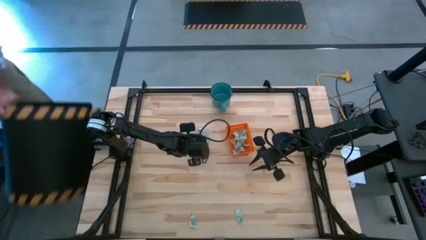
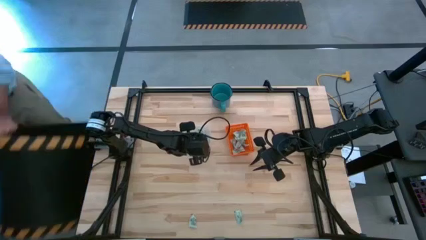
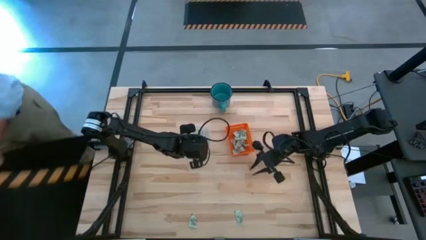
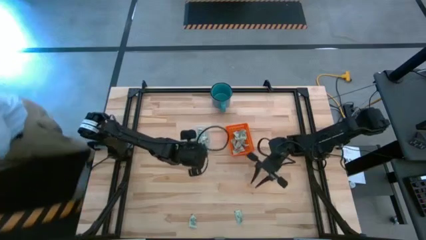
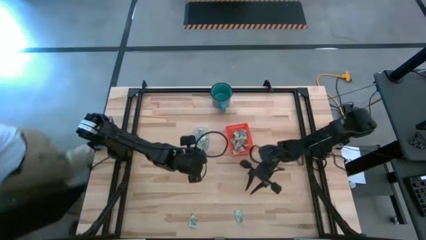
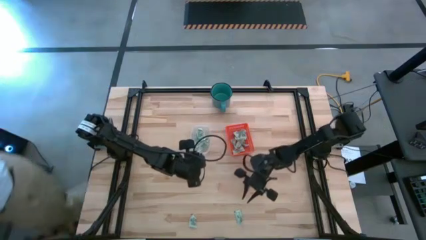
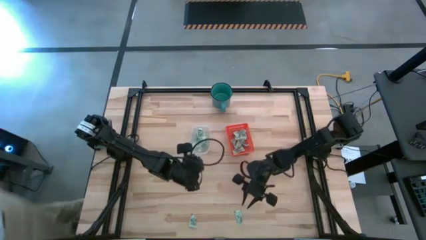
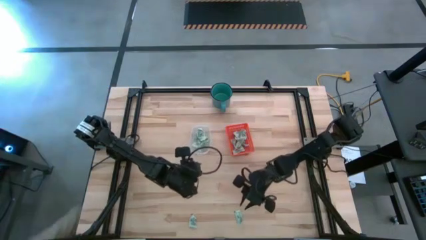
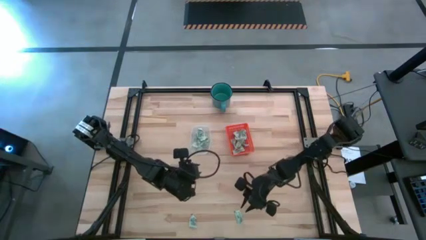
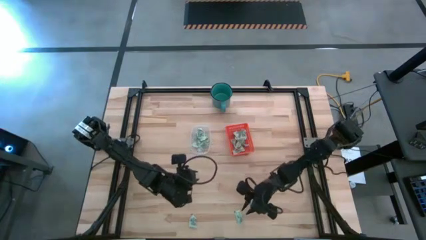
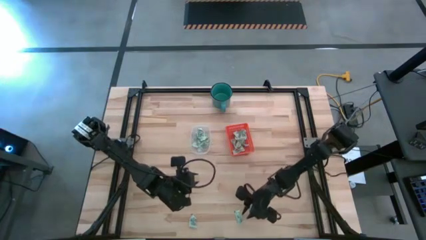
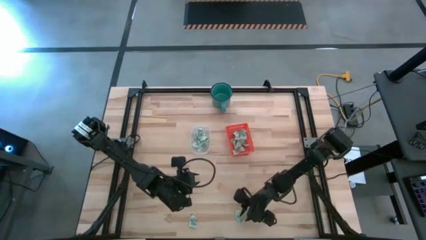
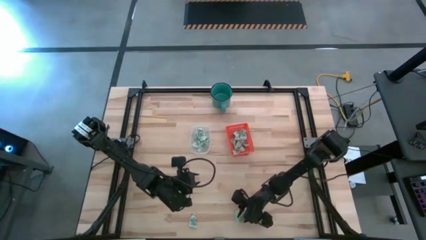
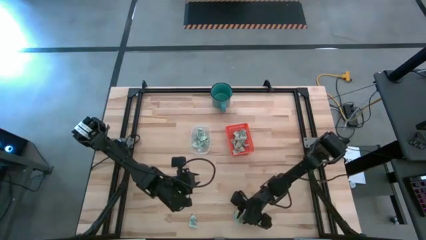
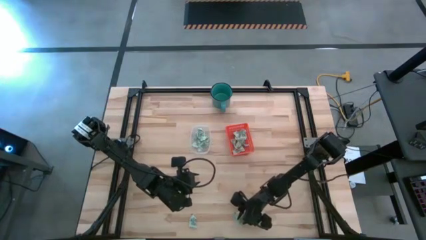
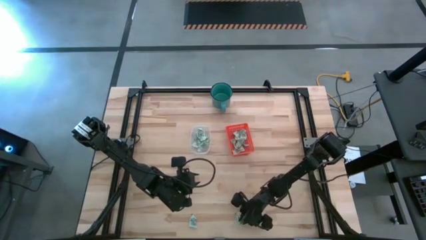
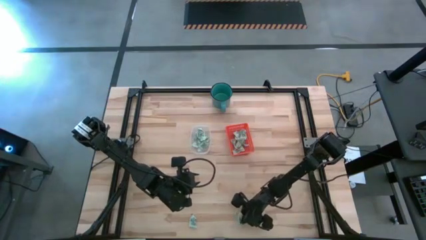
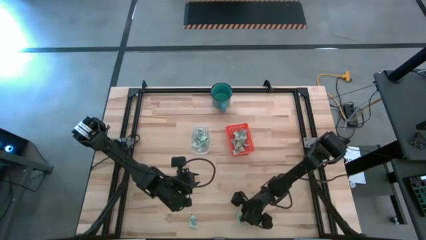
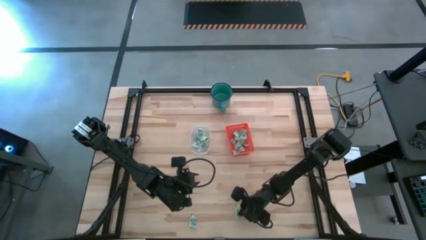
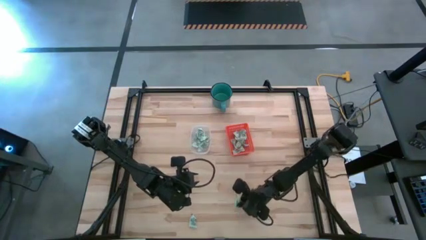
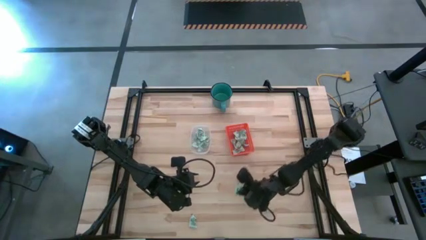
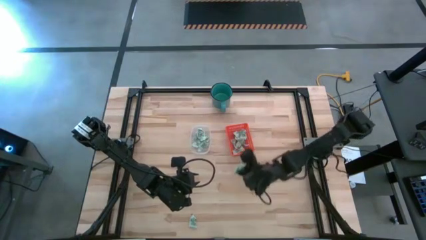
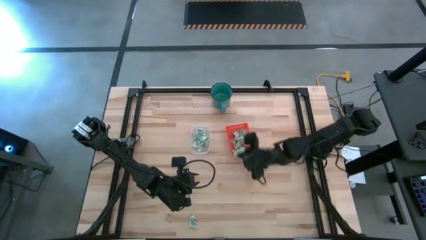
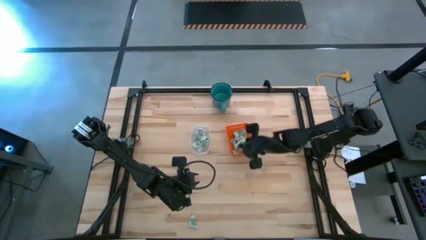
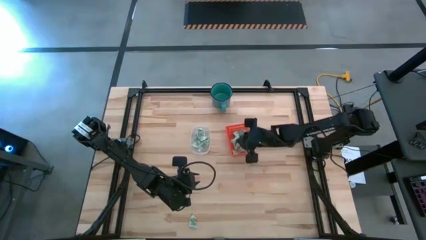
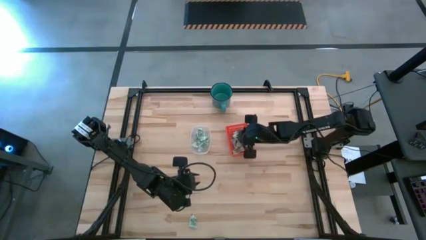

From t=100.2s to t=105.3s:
Task: Pick and place items into bin
Put the right stevia packet into the orange bin

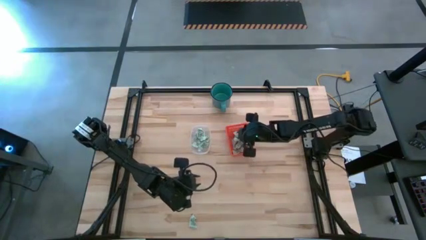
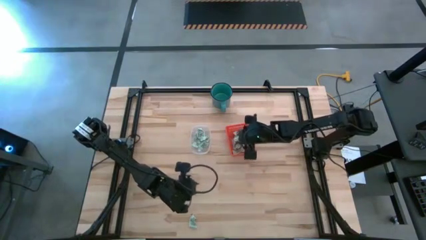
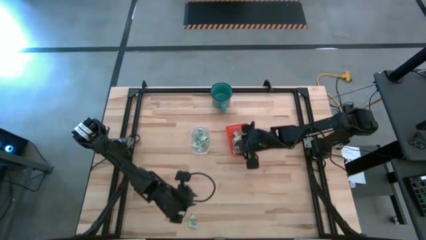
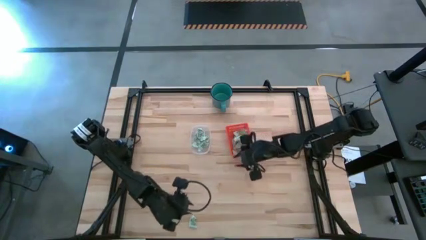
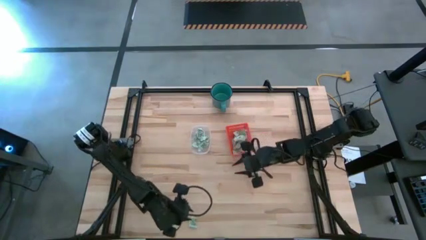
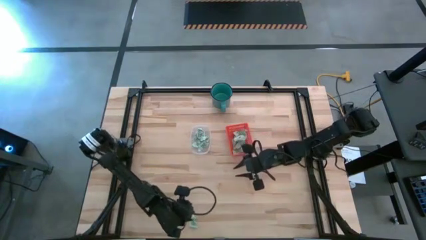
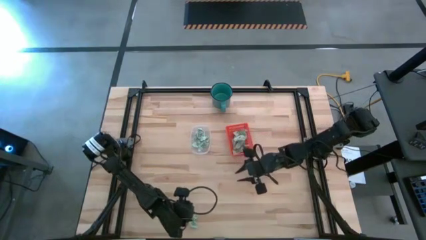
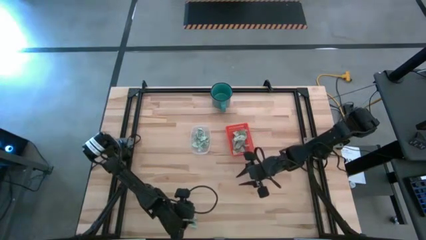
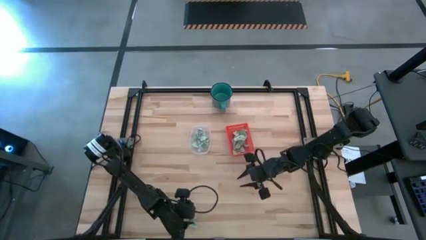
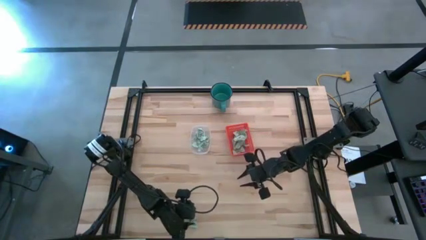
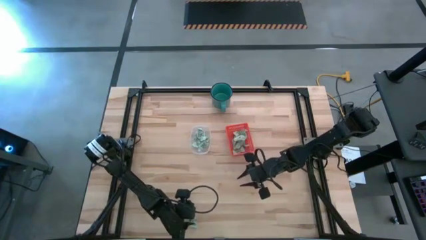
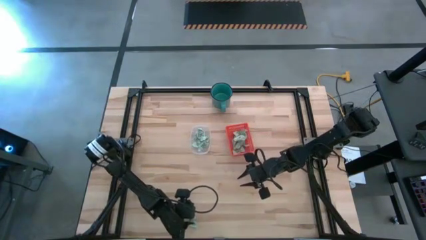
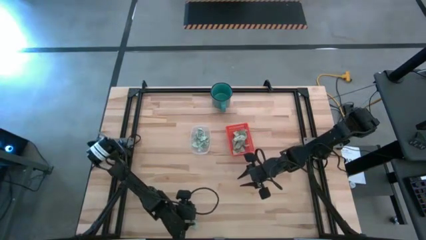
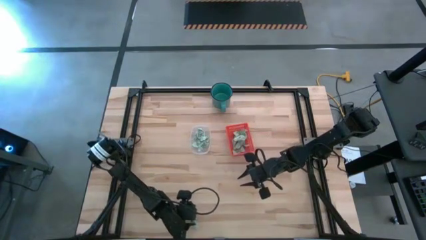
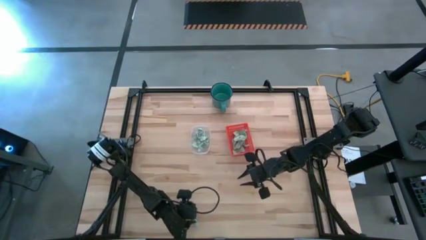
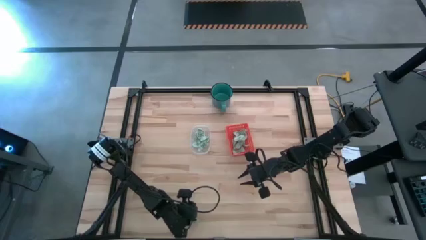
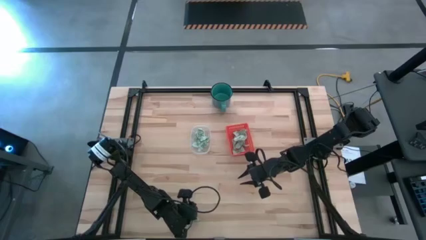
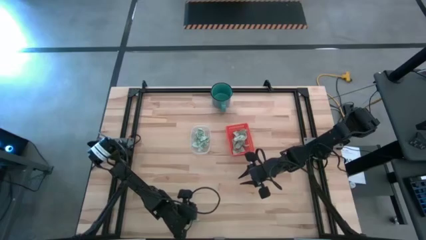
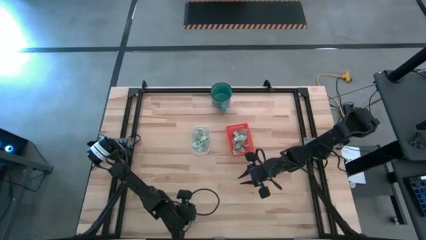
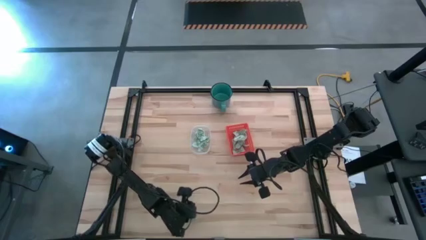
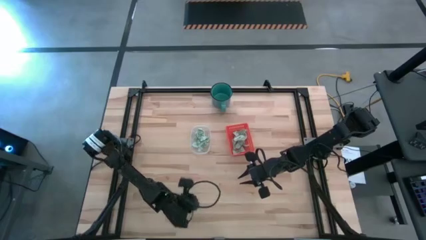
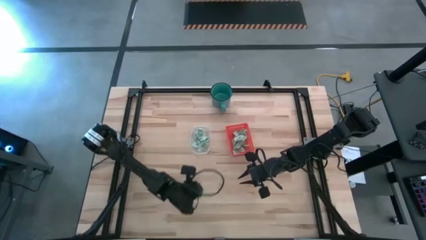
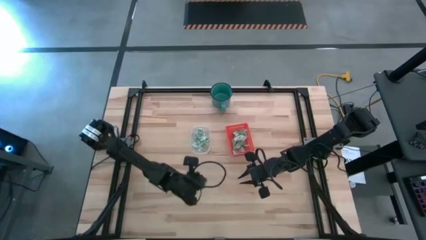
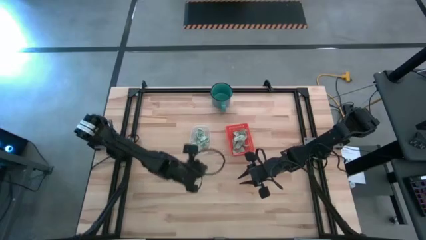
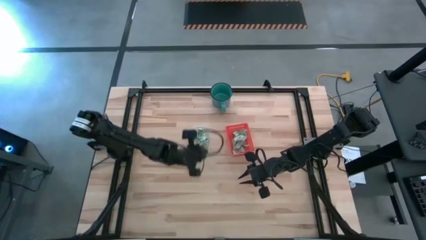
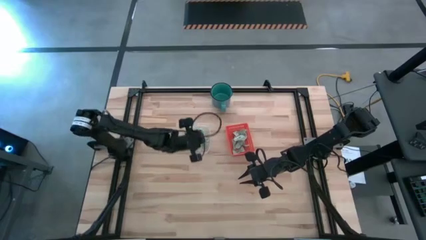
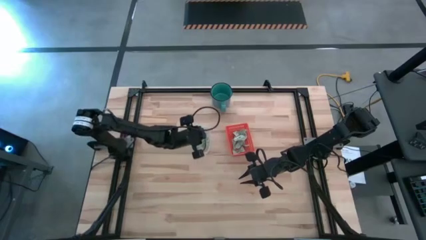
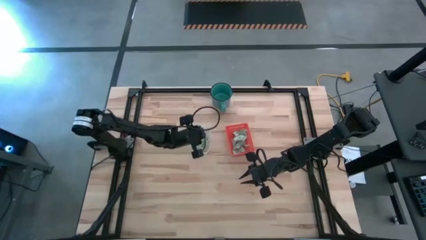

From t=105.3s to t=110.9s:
Put the stevia packet into the transparent bin

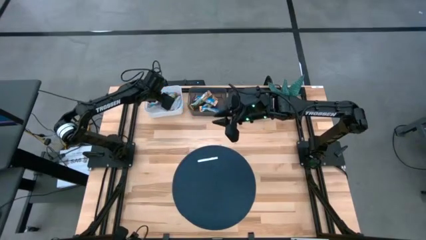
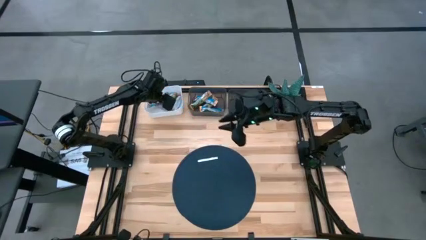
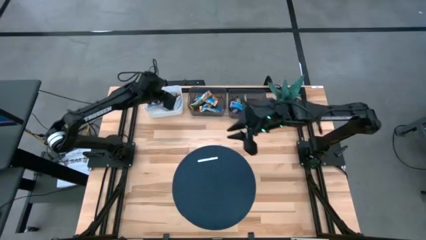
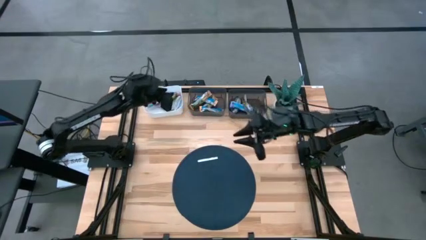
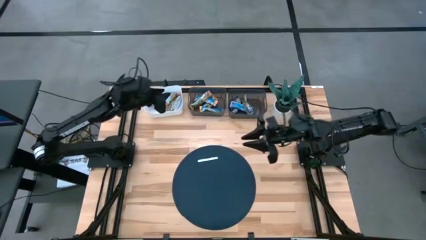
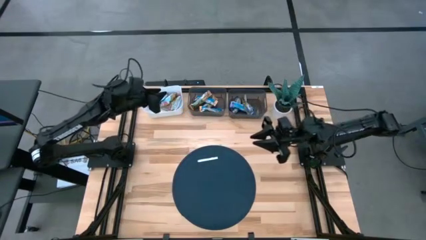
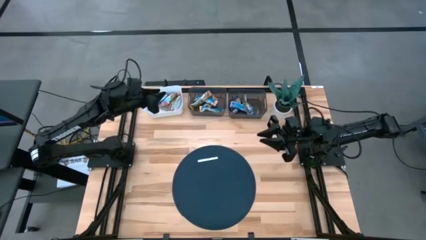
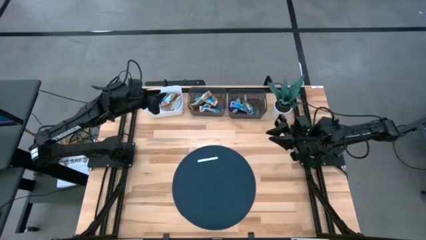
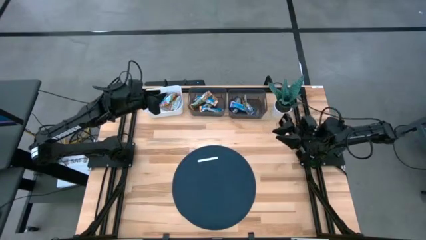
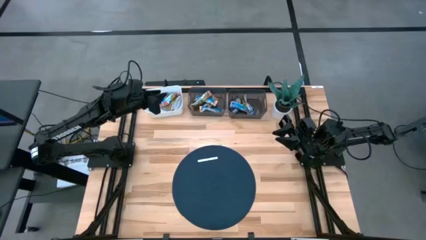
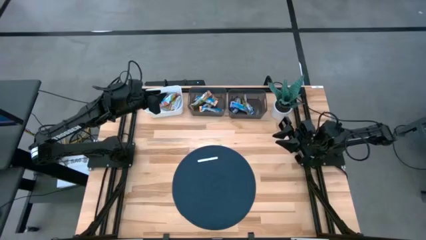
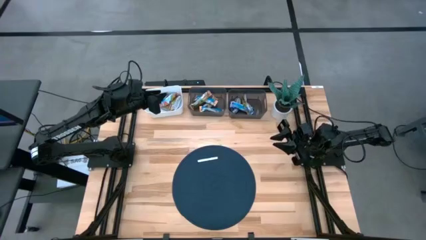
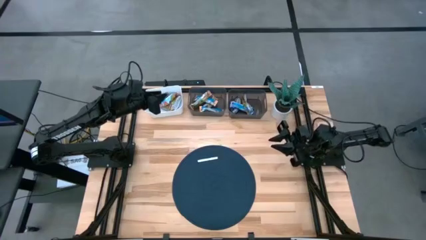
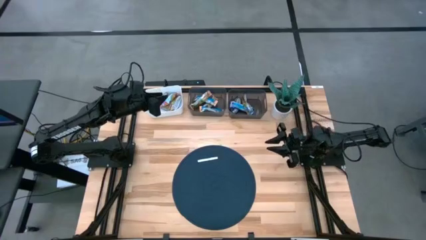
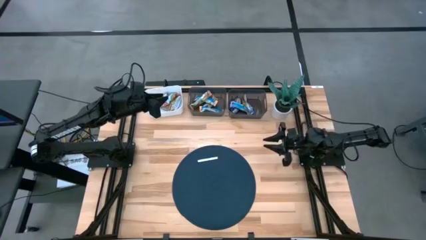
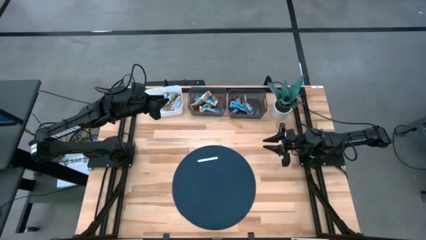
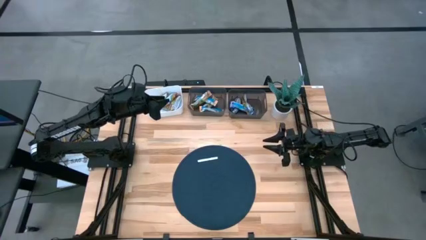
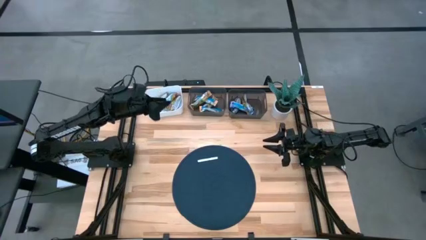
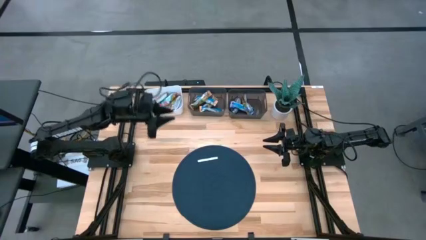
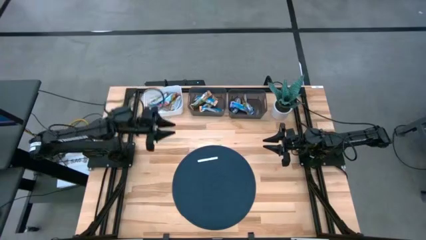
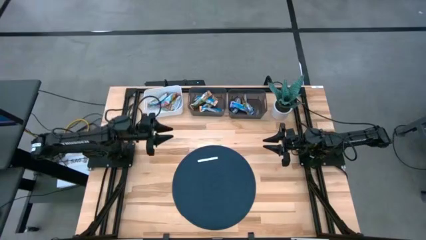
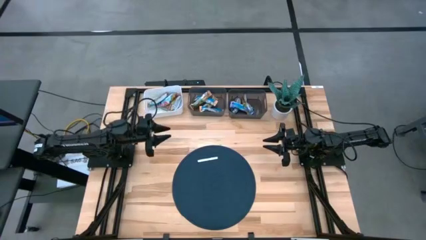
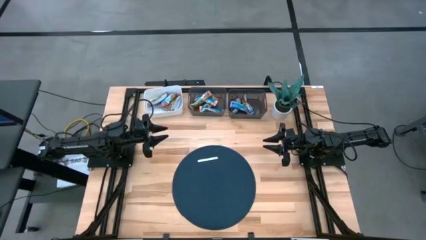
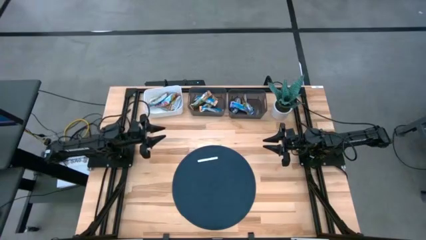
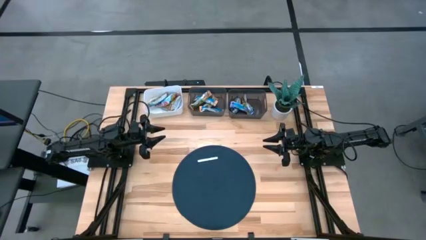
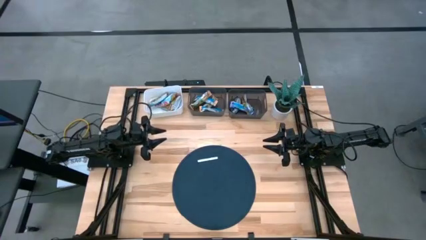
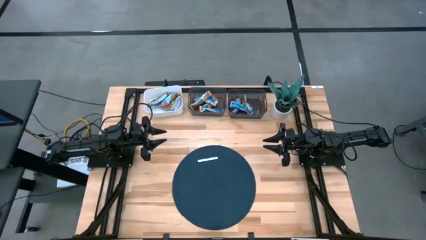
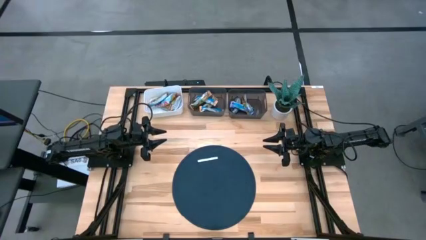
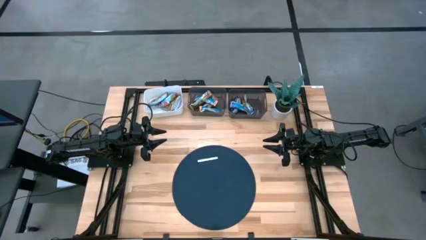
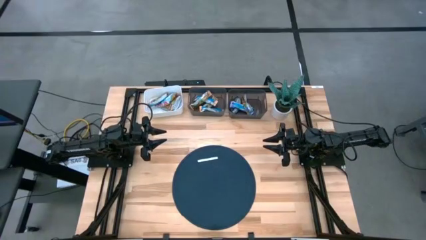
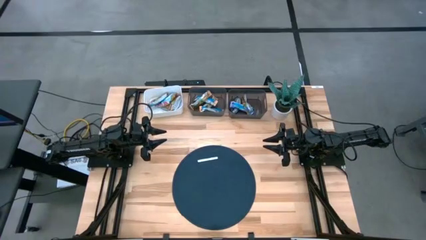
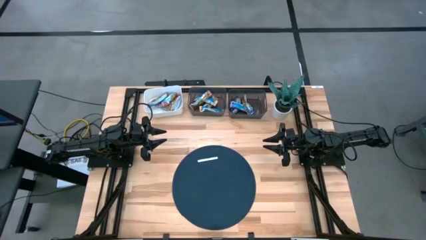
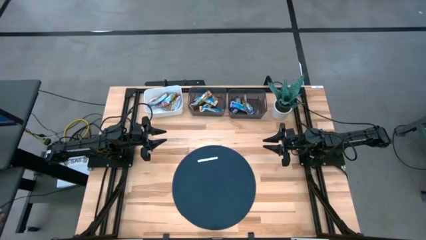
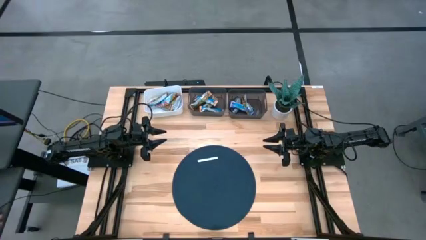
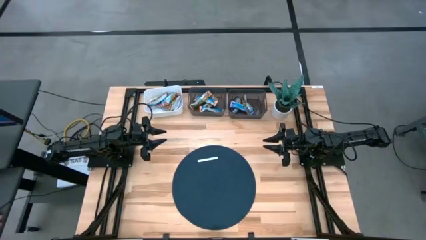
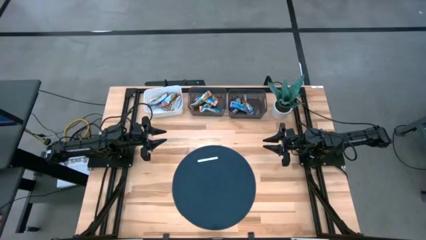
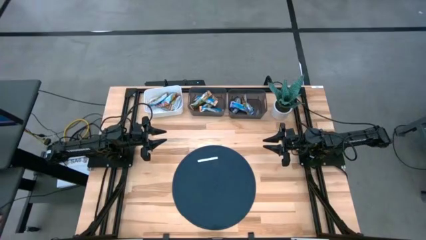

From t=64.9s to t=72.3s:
Task: Pick and place Granola Bars by type
Return to Home Position
